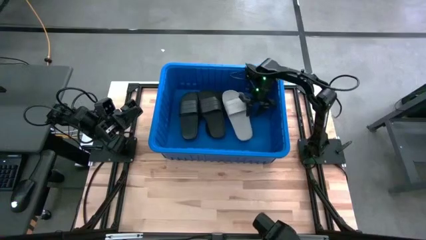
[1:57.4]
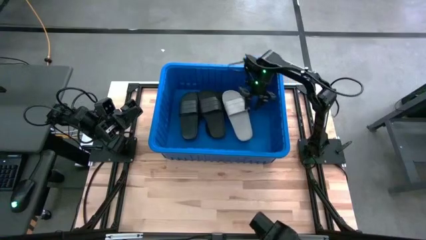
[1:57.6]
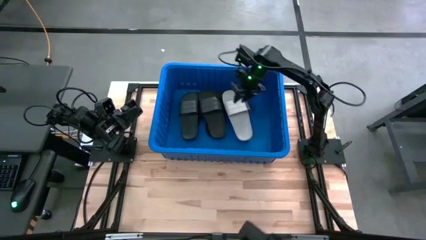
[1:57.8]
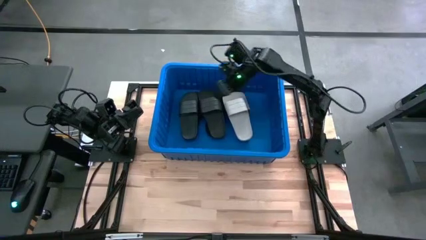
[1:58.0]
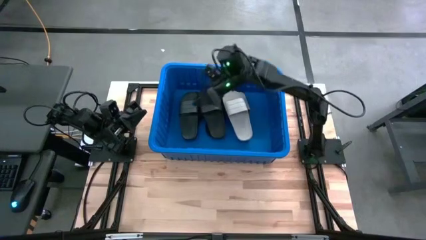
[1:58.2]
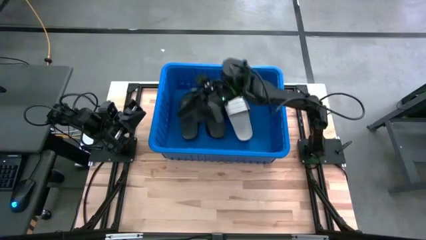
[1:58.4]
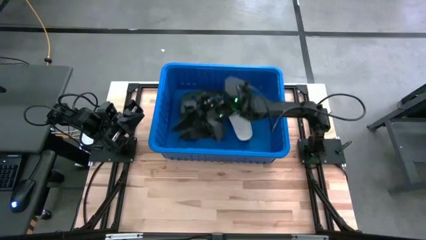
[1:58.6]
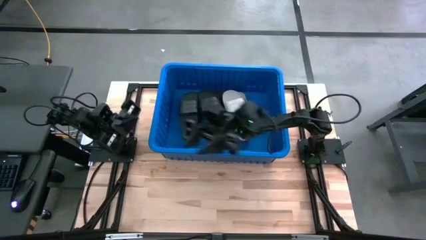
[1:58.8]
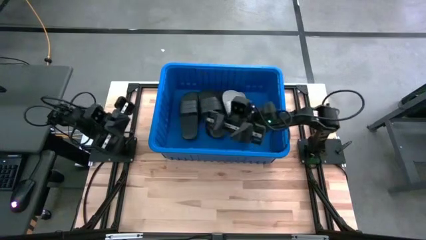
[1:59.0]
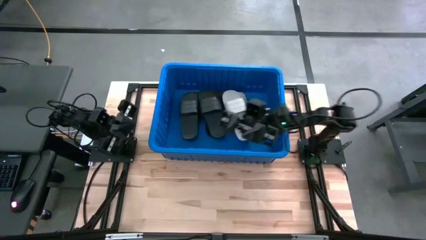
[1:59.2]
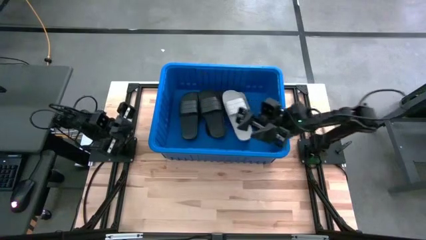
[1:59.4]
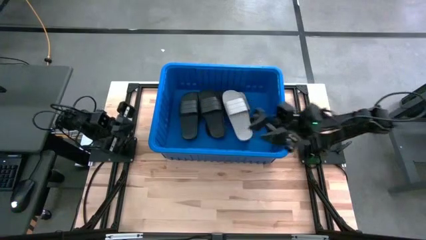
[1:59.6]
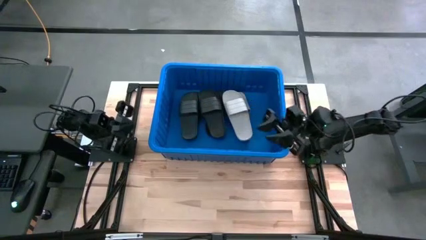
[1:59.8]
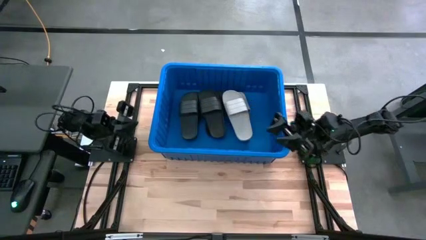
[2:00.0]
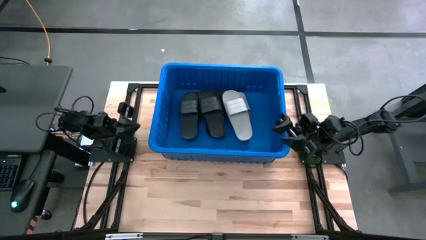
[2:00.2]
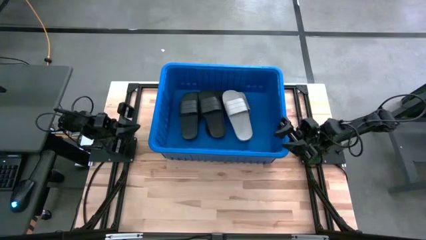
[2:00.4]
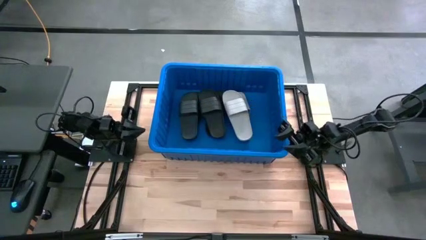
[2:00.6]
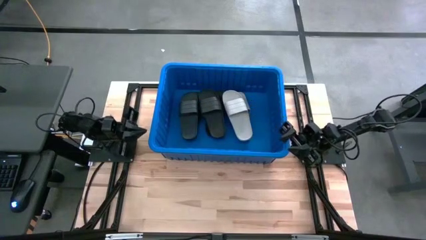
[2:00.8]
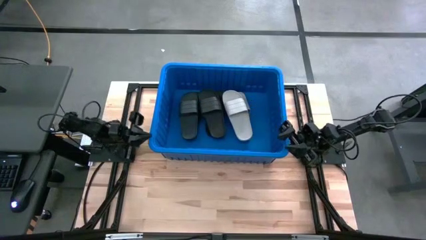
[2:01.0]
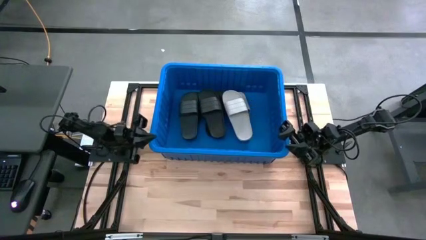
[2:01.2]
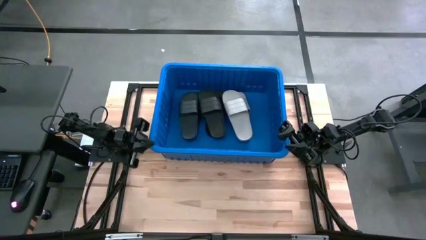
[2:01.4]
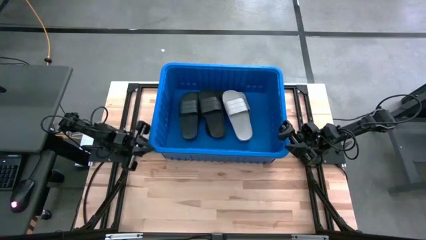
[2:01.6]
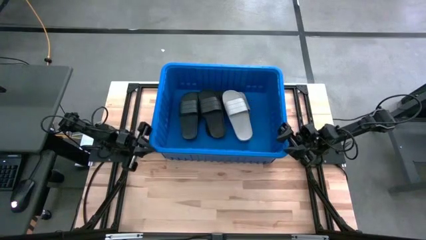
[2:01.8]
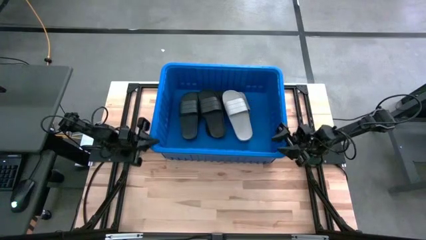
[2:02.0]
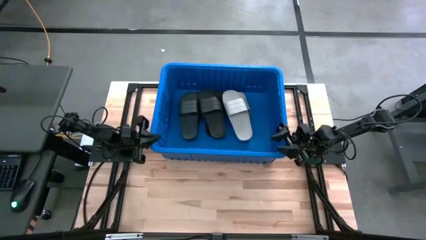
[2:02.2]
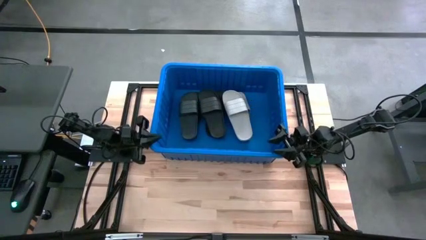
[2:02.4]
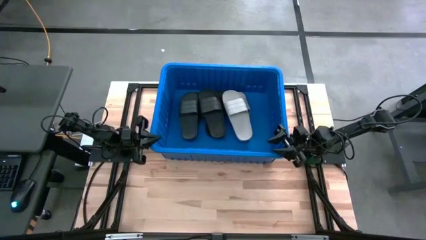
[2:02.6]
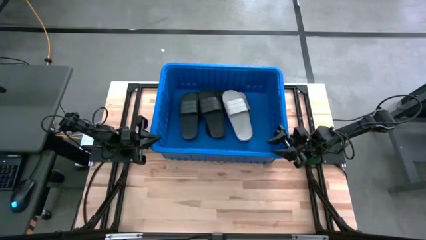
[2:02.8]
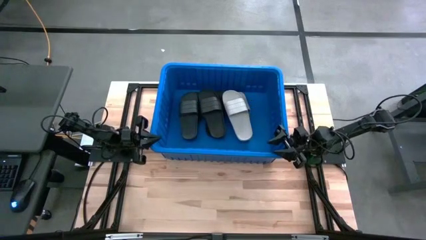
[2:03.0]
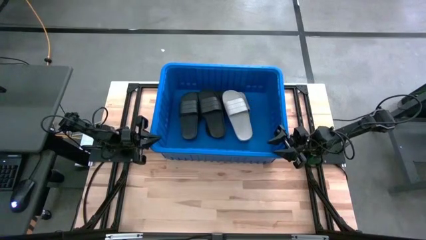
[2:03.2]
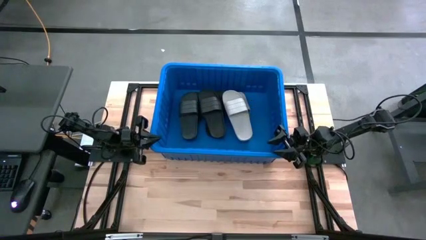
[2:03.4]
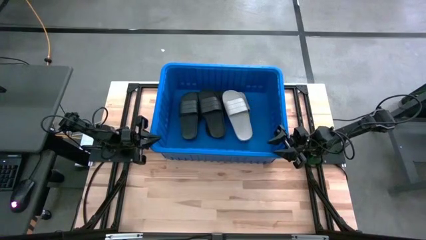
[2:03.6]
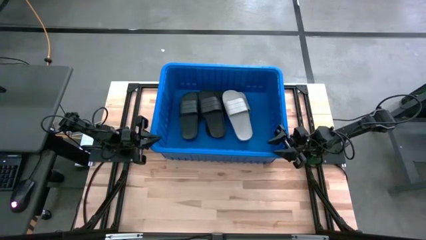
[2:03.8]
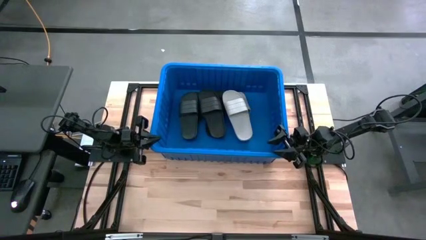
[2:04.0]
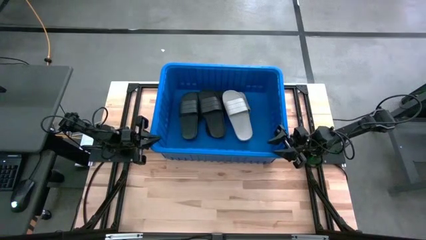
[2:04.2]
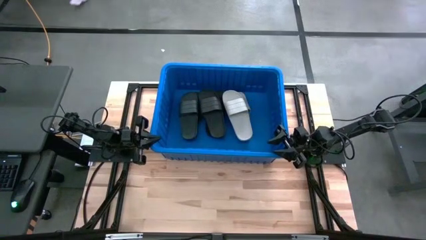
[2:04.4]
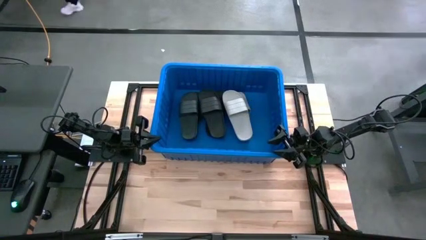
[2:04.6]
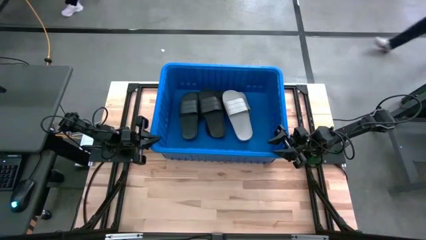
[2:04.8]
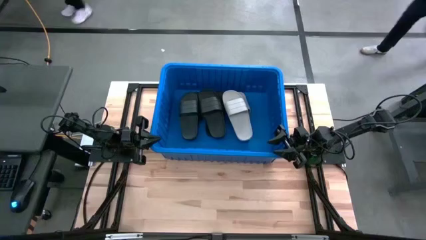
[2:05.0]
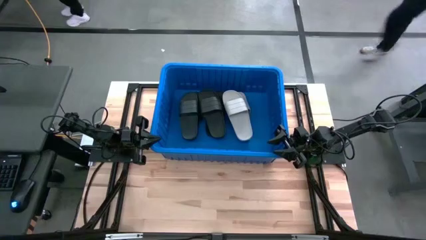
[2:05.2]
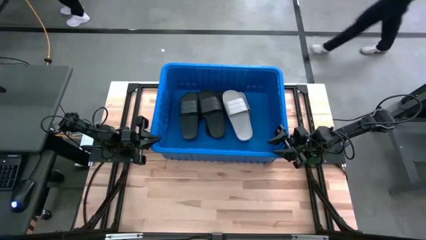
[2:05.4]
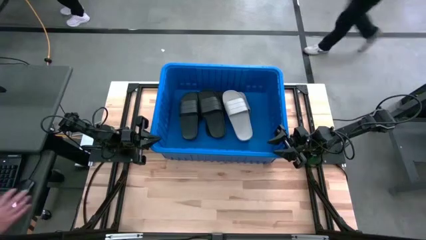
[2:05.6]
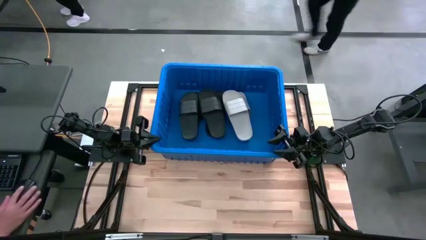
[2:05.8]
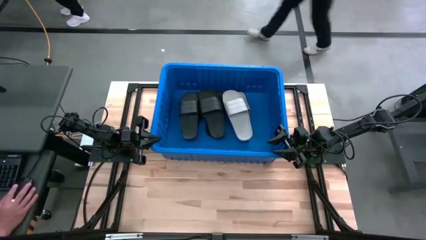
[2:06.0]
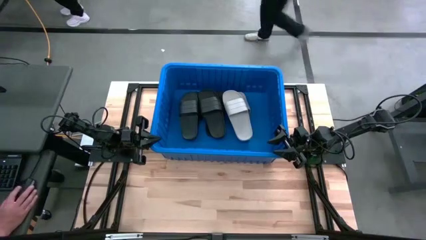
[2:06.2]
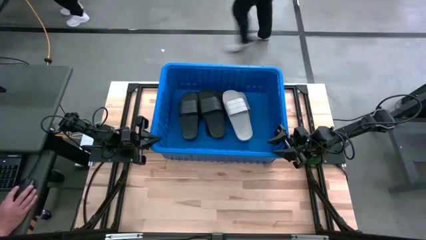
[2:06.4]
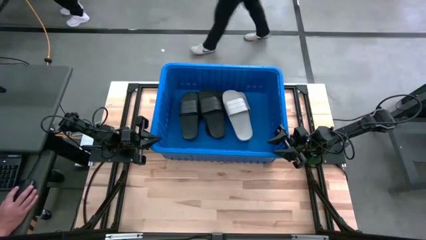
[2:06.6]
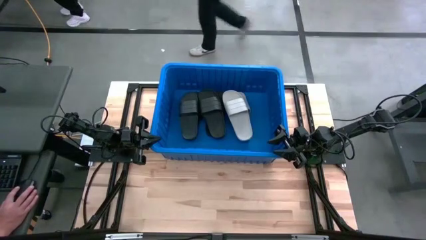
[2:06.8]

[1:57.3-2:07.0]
Task: Pick and place slides into bin
Return to Home Position

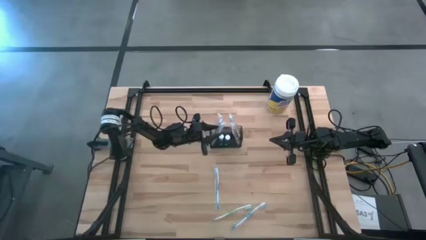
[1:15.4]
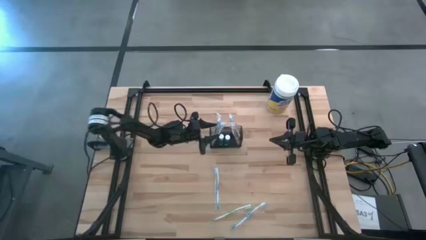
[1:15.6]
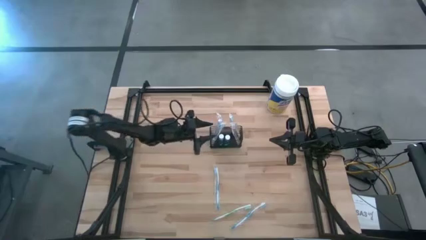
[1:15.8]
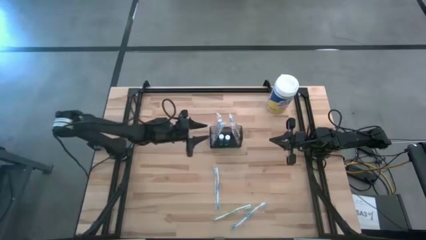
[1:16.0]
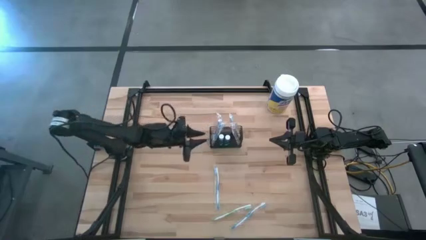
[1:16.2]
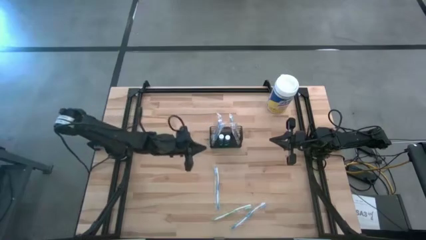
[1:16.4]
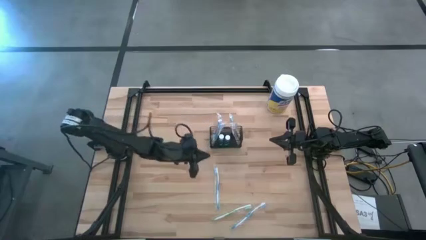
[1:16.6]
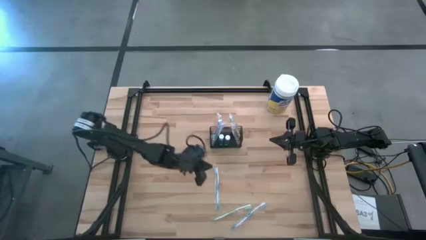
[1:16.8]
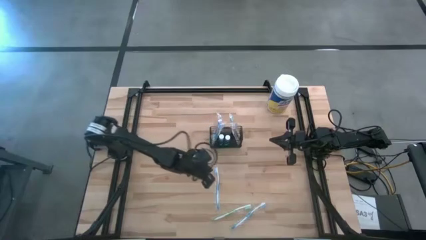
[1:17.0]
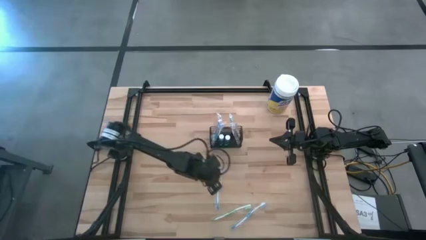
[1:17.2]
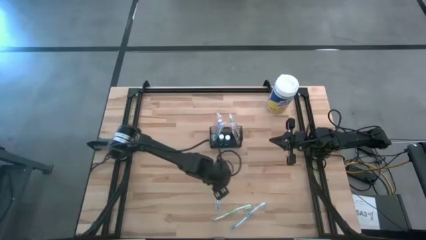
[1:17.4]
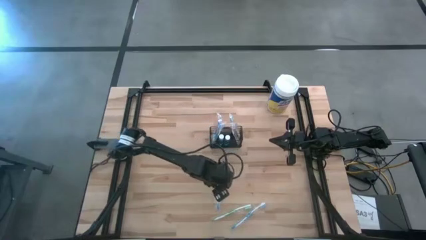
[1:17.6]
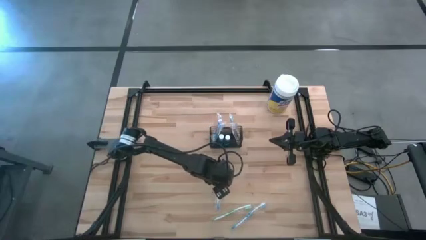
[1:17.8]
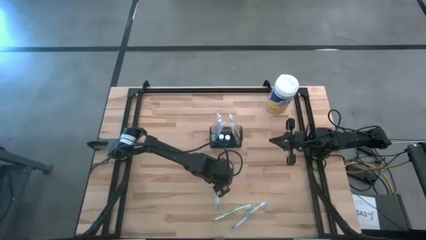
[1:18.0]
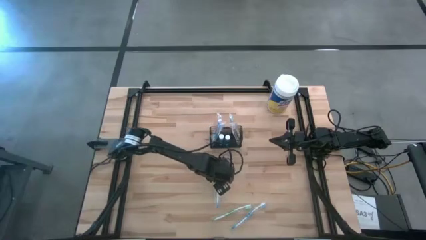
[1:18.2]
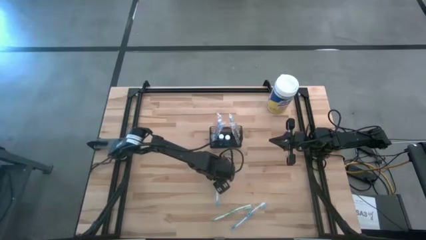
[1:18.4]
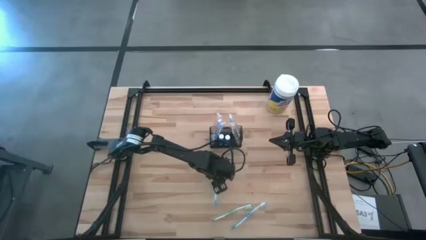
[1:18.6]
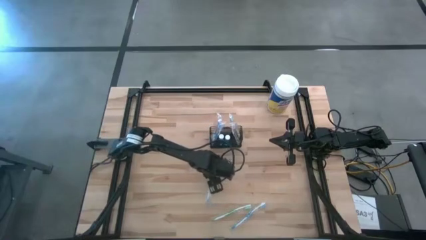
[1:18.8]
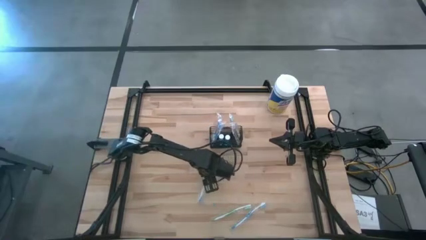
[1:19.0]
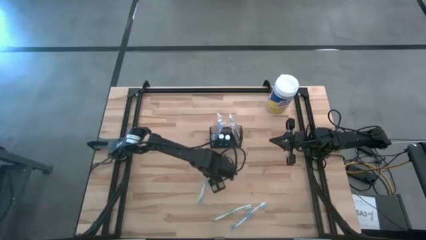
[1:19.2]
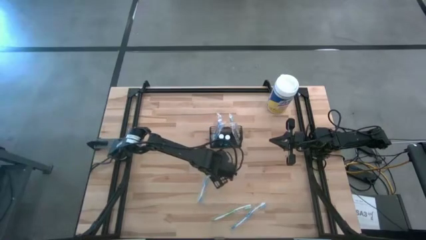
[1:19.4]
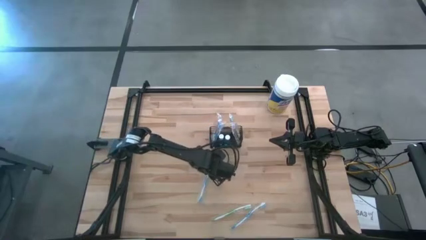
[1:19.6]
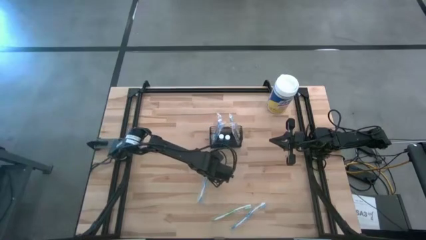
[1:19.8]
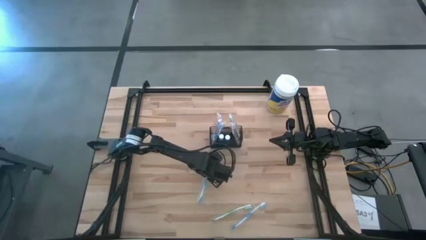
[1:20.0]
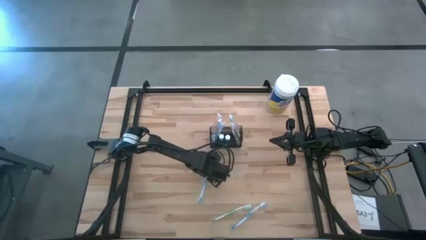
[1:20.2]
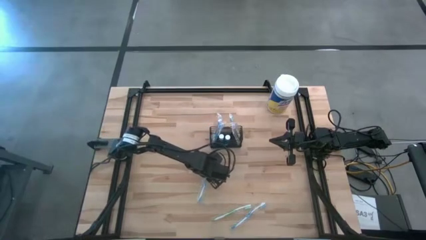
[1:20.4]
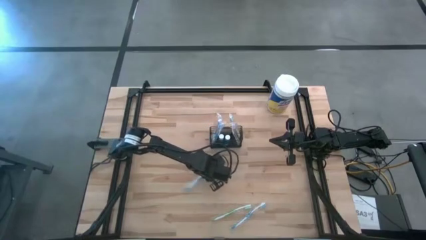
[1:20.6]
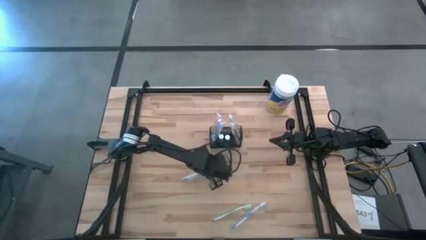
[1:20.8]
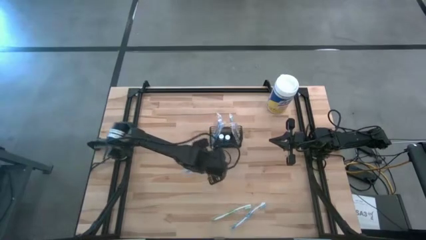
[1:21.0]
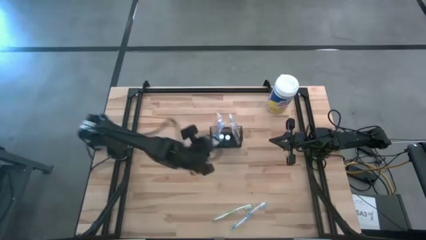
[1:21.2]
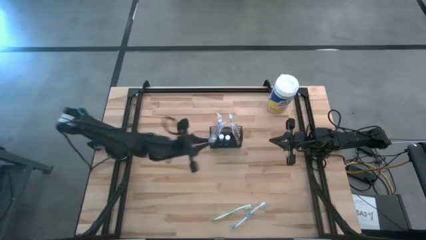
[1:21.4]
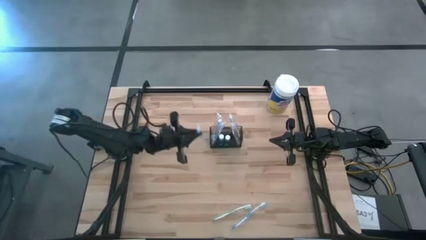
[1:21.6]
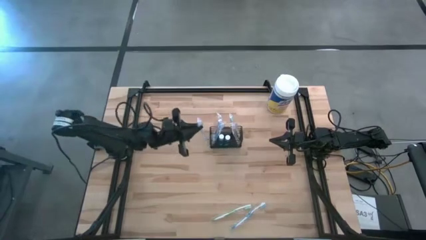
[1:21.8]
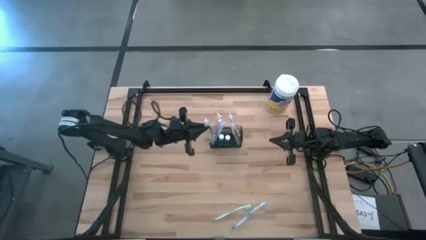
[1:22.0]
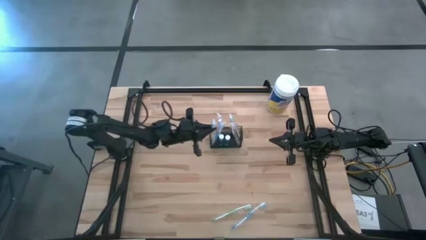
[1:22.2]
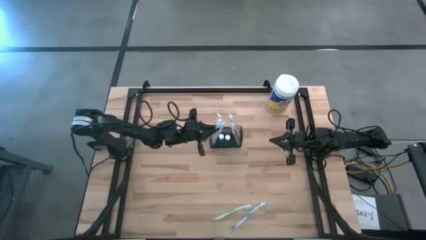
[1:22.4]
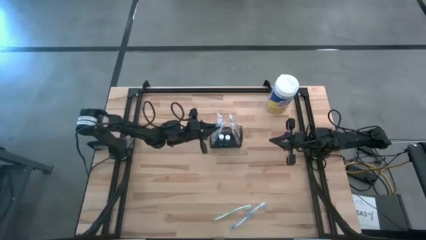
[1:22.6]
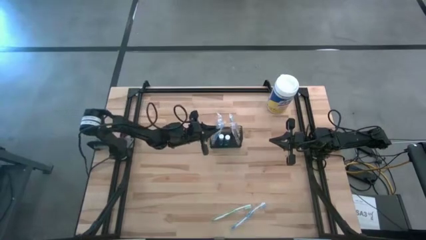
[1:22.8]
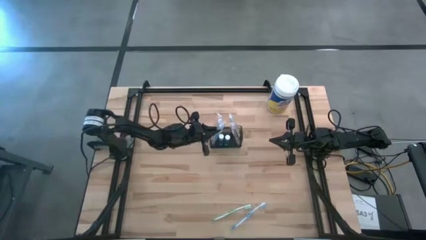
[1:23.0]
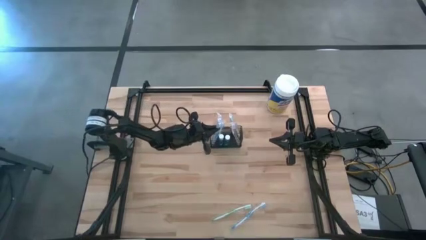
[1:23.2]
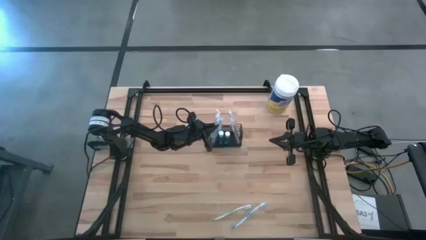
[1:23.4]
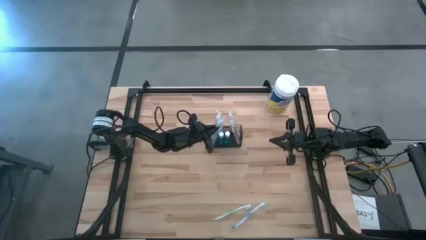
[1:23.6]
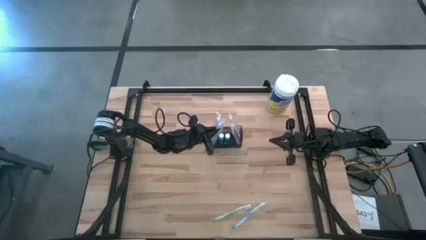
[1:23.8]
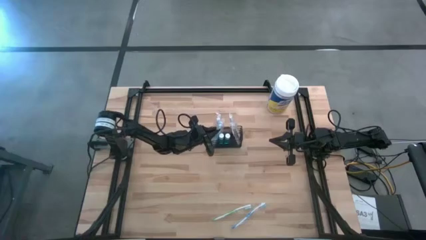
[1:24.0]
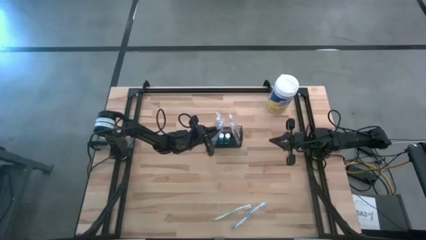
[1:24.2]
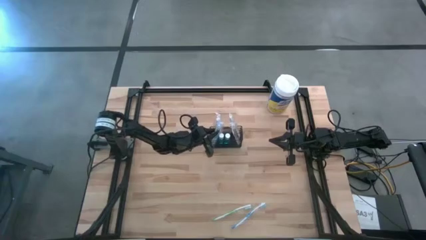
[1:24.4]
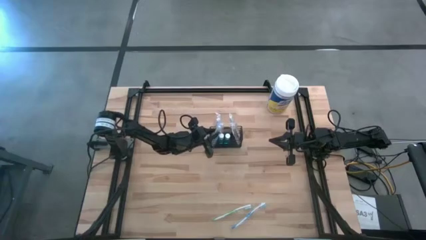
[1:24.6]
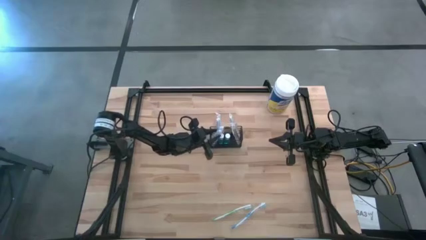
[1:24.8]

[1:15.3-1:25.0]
Task: Pick & Place toothbrushing station
Put the top blue toothbrush into the black wire organizer
